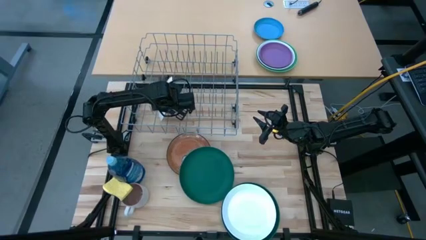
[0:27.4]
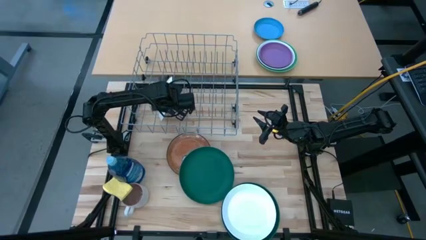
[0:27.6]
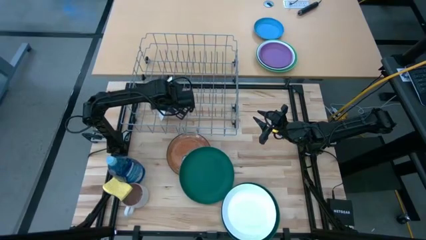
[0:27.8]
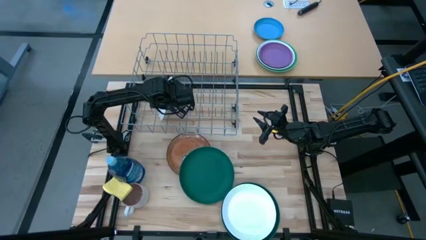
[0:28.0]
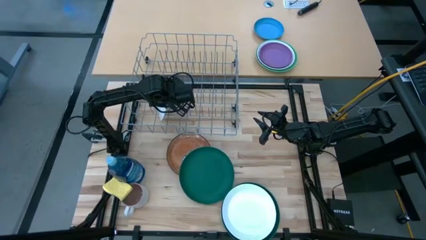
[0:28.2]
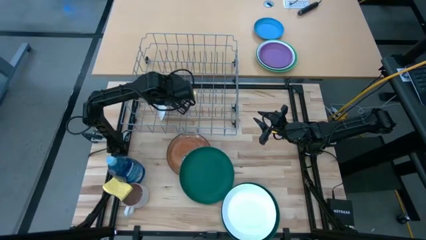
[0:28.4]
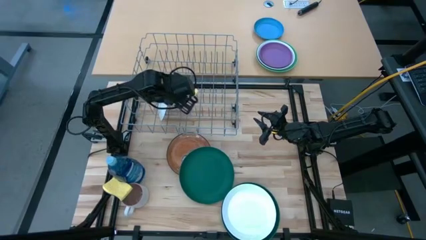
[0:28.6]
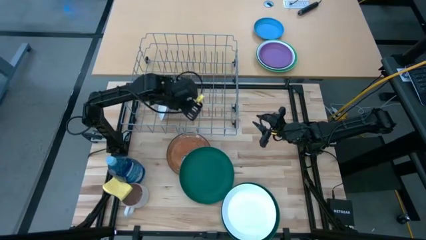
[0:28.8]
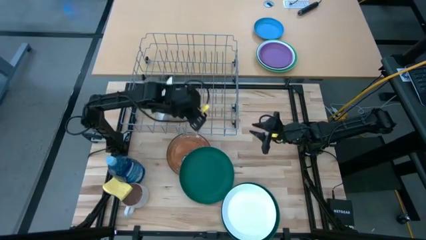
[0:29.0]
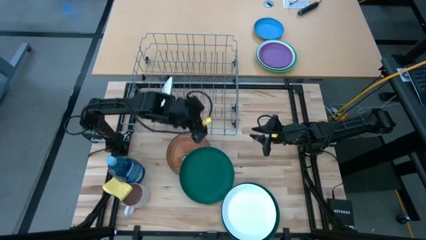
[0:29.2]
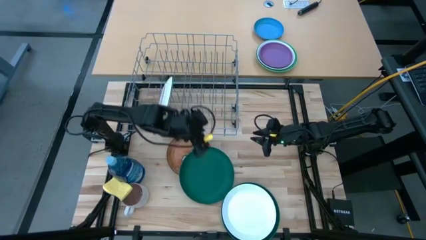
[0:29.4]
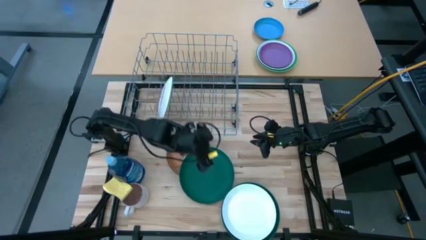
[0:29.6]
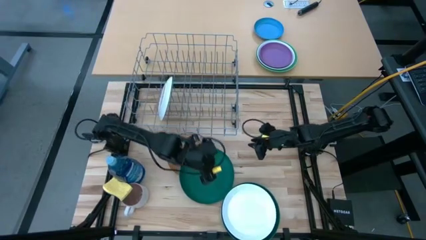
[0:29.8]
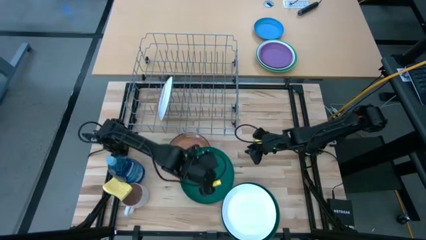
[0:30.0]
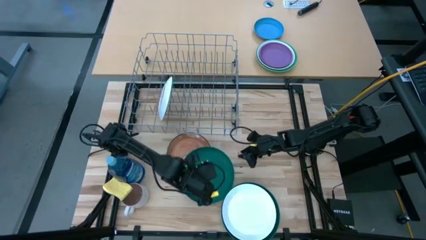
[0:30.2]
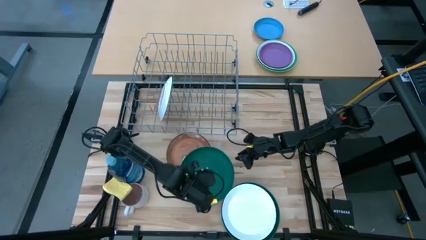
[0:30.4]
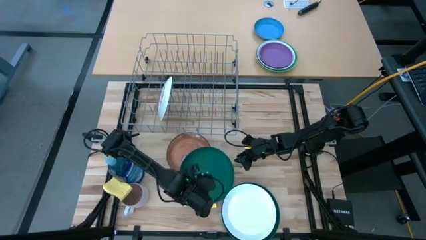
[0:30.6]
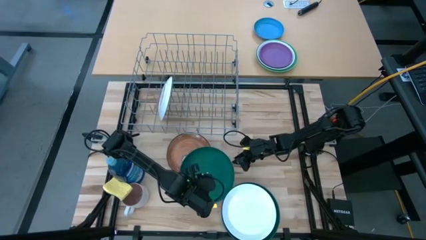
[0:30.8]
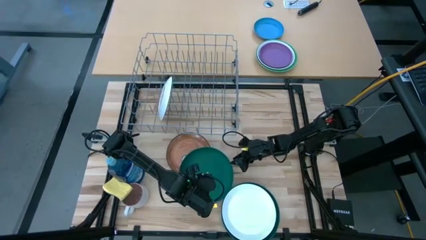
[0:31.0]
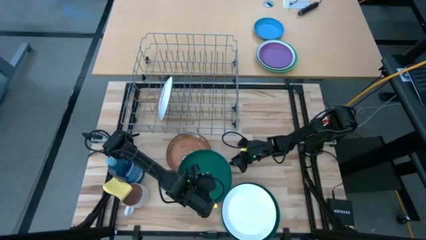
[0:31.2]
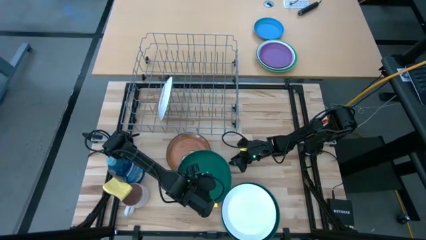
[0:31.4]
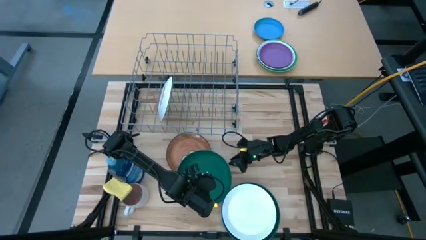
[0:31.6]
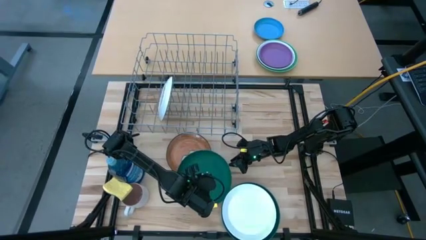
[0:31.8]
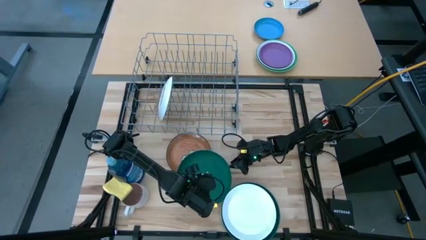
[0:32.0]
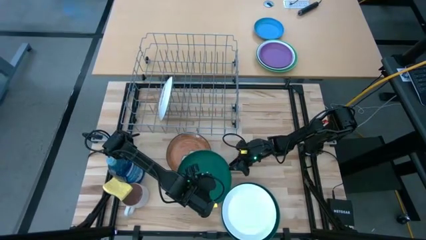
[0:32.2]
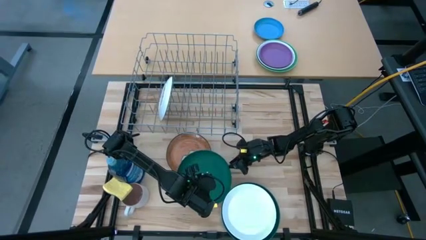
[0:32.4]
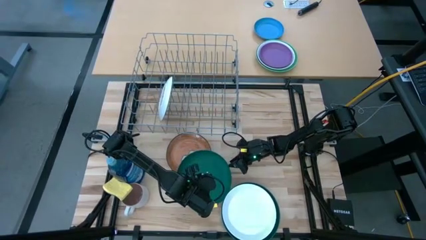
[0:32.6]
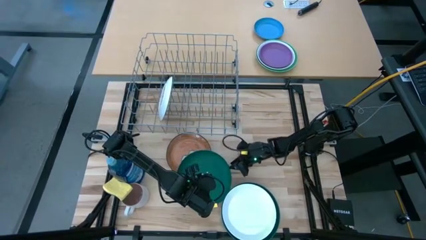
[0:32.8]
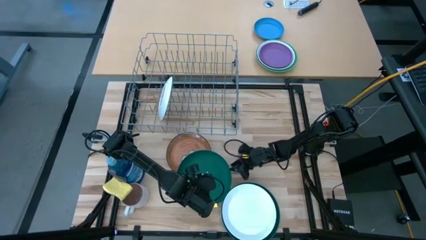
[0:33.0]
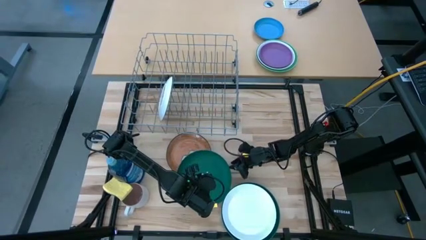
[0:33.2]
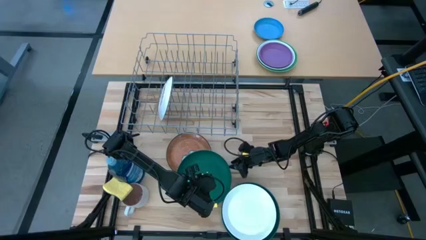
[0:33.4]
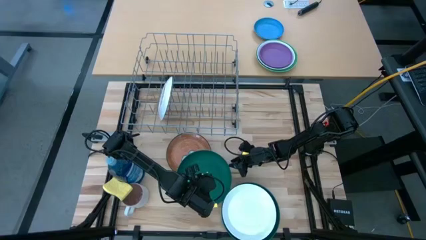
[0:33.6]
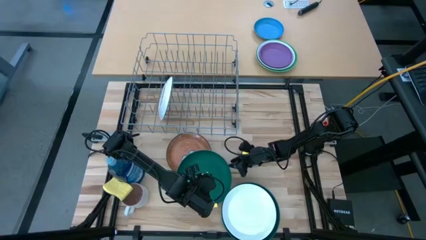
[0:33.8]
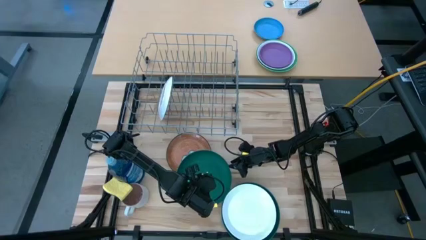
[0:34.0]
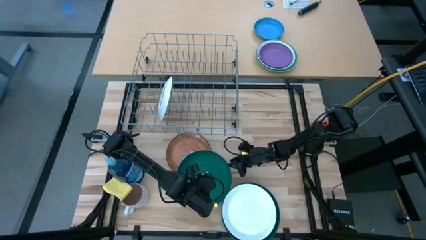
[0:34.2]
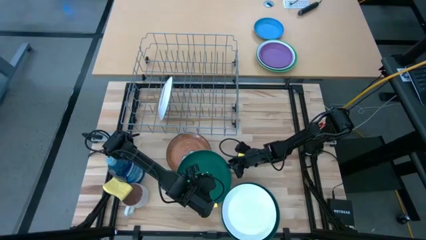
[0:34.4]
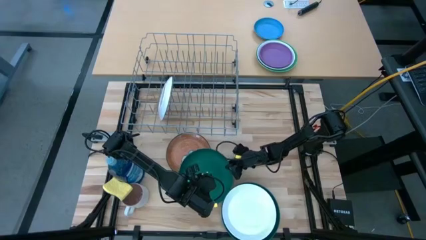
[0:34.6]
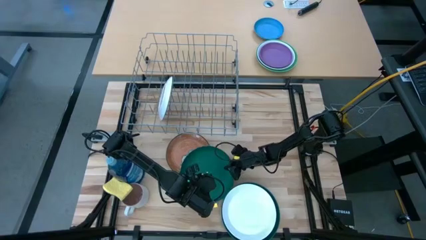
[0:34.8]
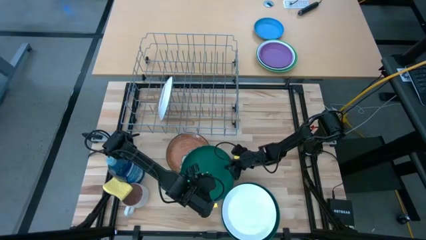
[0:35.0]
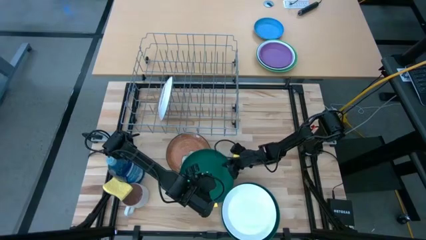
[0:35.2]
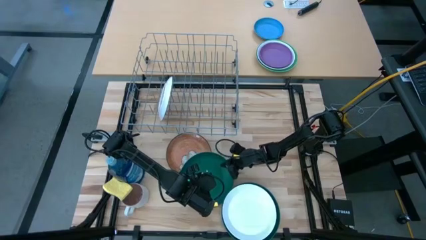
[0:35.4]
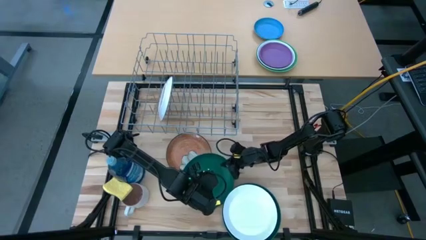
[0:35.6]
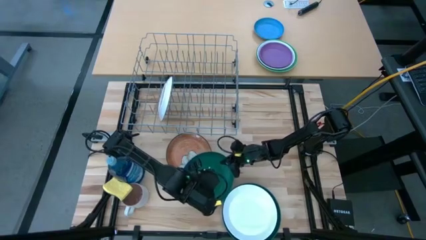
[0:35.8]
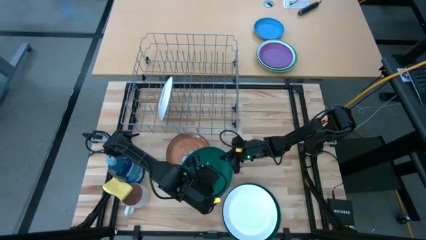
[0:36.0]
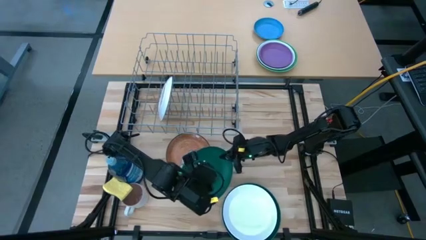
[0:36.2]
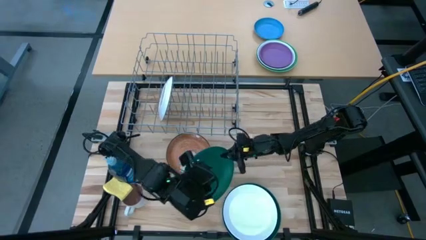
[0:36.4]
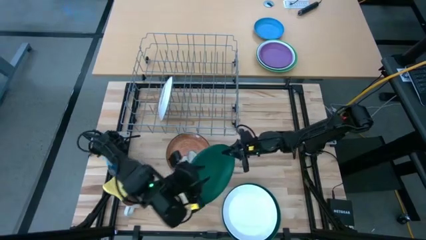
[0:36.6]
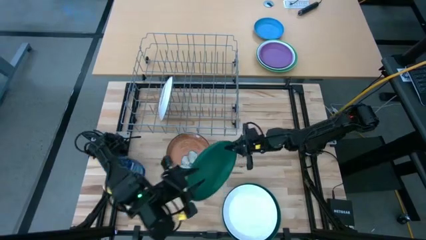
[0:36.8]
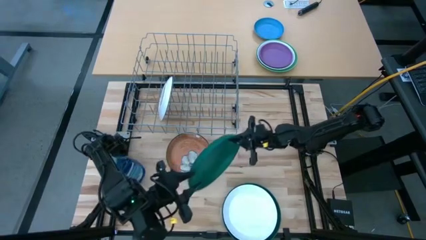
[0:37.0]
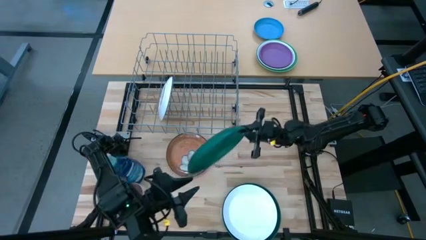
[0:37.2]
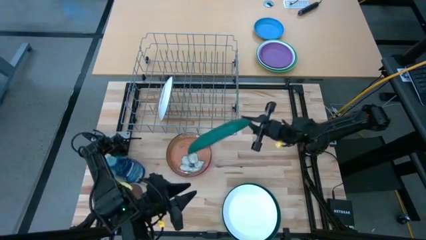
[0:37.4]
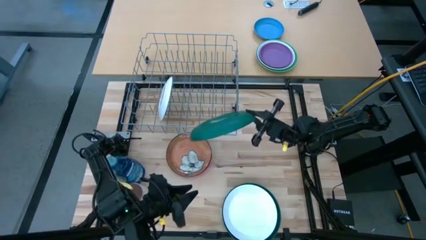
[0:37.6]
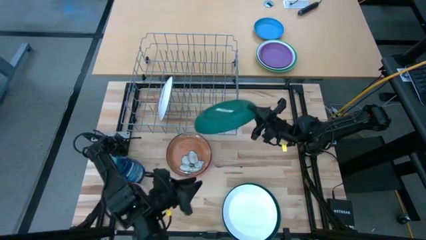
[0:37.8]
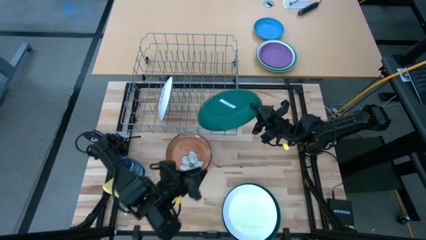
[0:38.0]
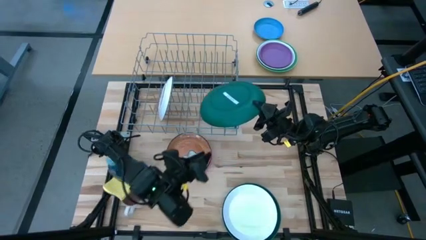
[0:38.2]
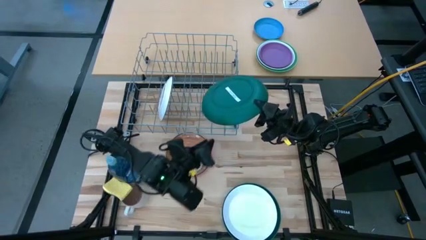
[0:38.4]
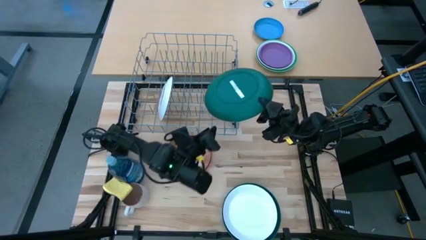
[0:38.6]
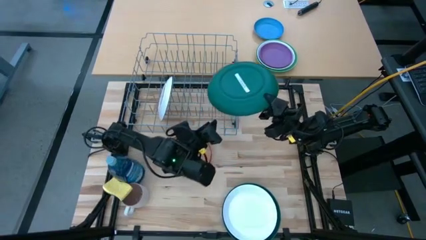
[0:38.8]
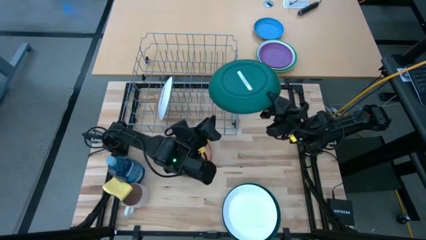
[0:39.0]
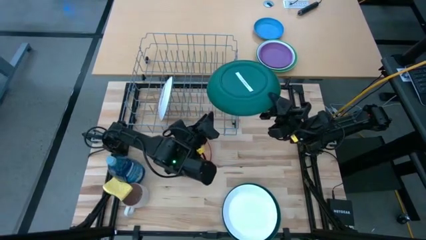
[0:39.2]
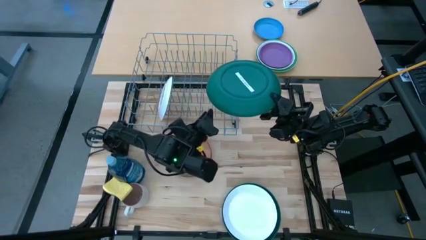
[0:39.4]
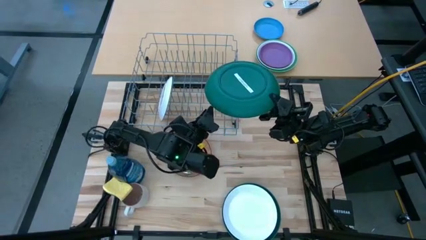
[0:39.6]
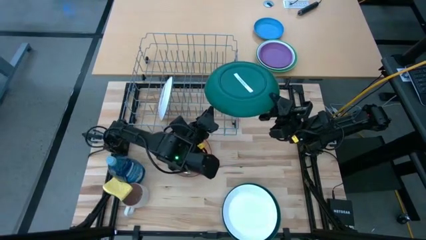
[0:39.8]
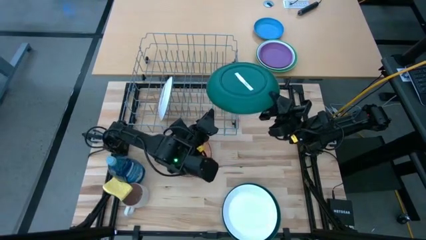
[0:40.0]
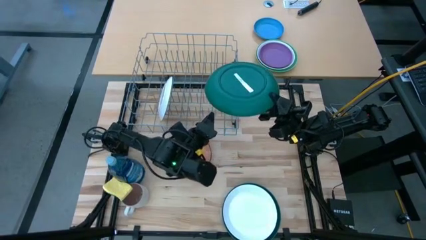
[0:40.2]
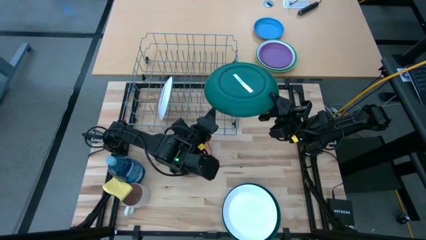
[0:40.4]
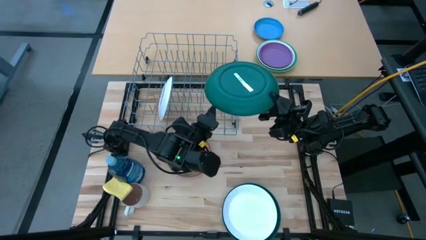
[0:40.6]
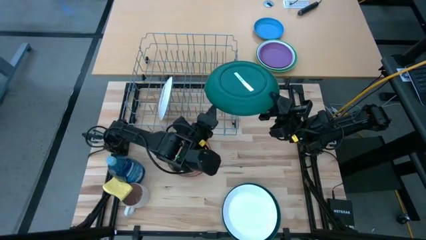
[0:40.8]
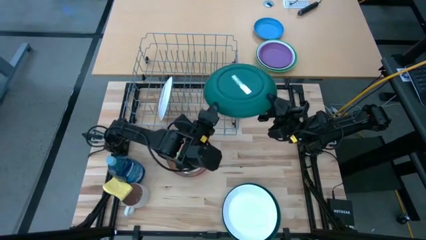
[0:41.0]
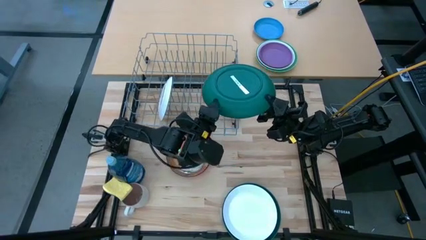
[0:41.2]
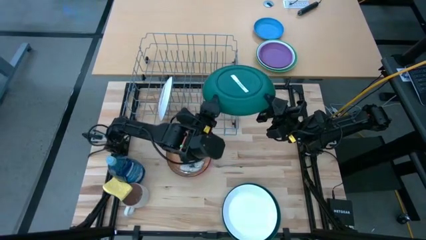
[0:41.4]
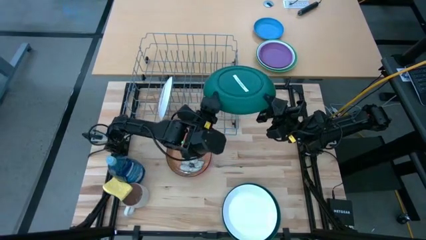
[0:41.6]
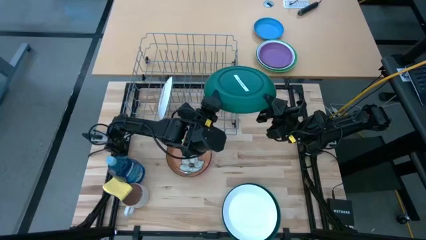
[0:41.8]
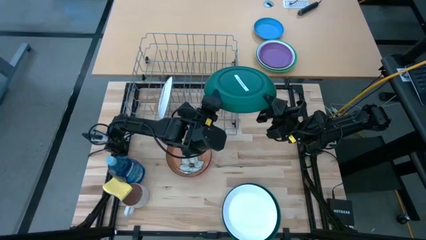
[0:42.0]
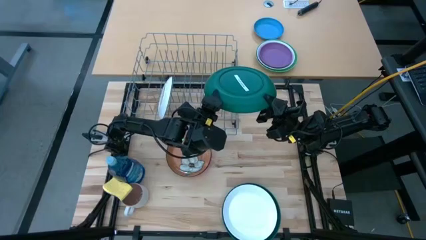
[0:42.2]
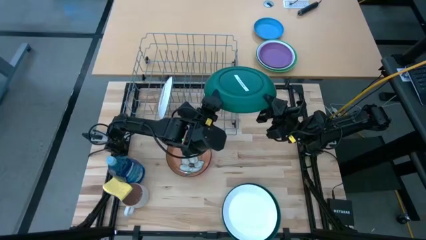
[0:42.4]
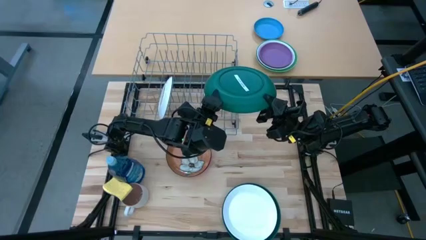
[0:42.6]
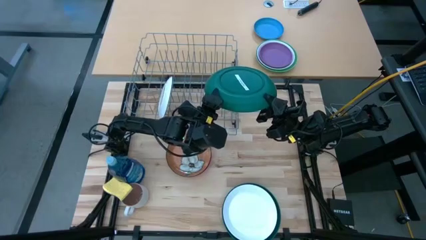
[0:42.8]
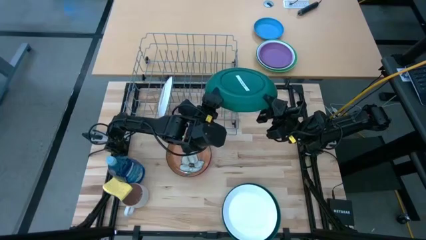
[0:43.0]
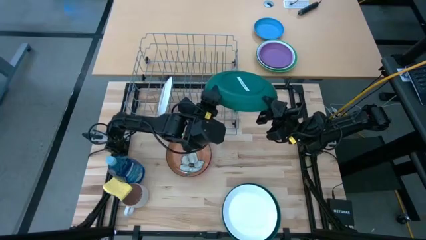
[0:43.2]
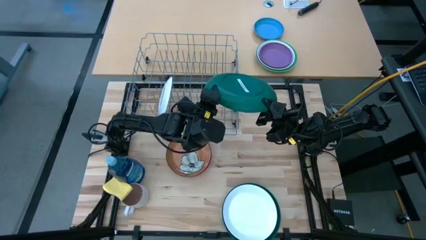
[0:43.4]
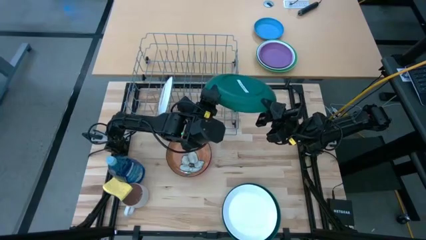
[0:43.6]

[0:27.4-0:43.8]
Task: Sort dishes
Put the top green plate on the dish rack
